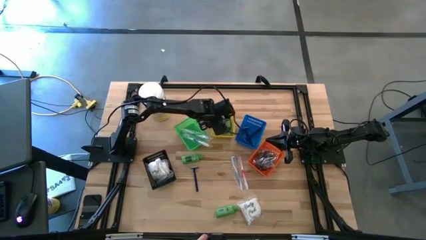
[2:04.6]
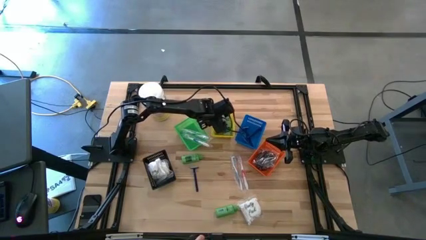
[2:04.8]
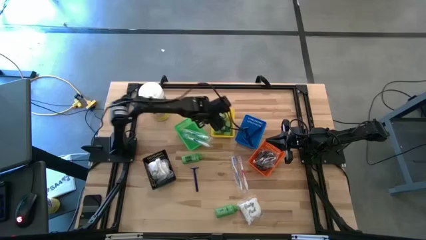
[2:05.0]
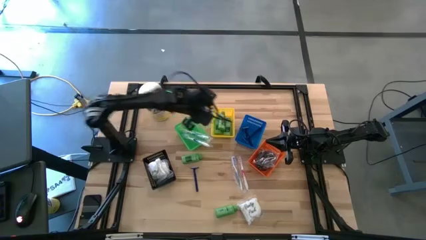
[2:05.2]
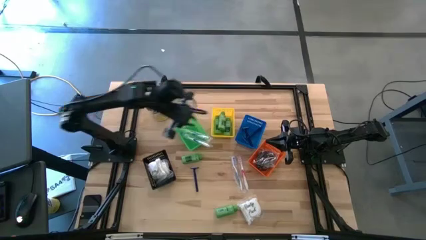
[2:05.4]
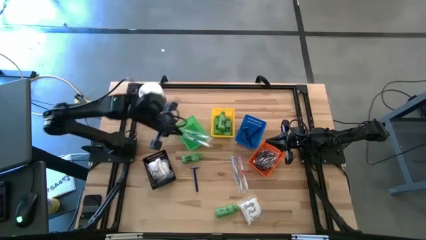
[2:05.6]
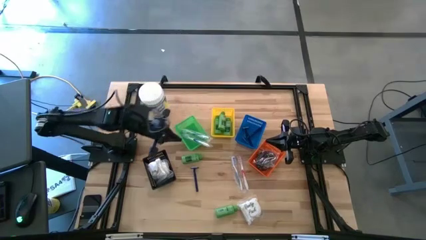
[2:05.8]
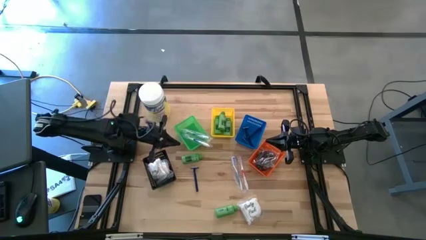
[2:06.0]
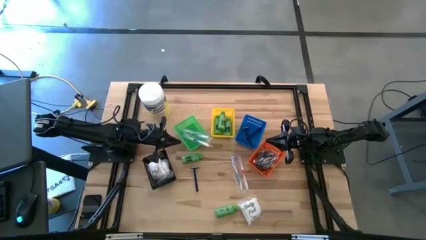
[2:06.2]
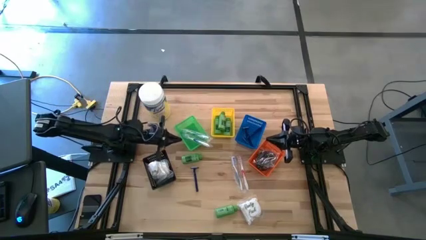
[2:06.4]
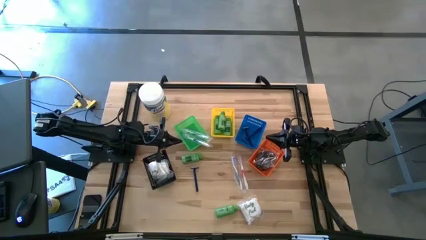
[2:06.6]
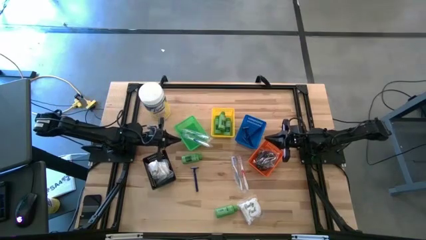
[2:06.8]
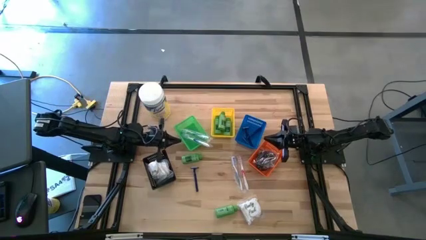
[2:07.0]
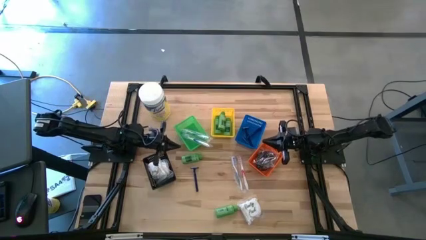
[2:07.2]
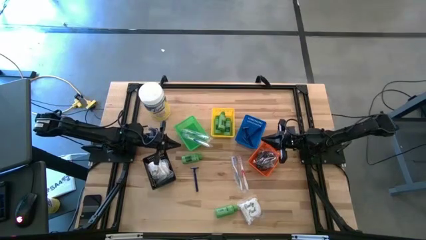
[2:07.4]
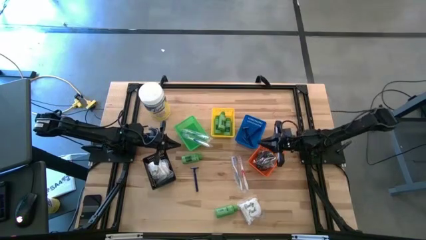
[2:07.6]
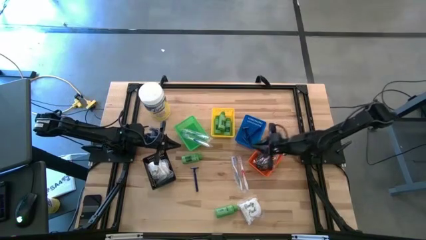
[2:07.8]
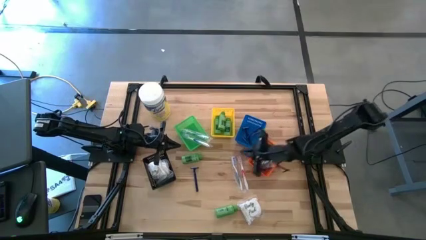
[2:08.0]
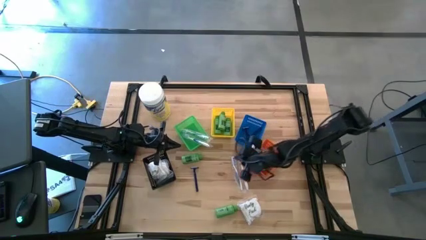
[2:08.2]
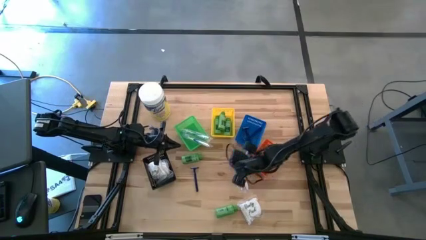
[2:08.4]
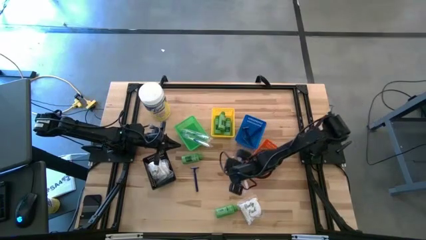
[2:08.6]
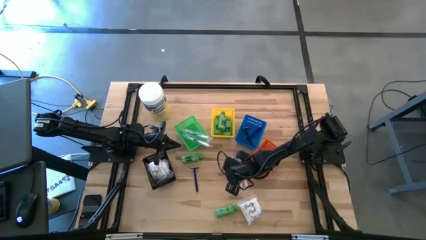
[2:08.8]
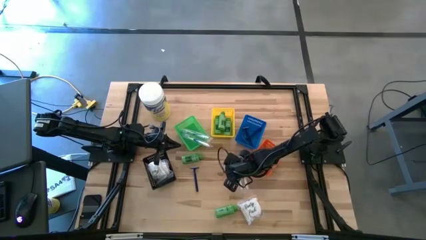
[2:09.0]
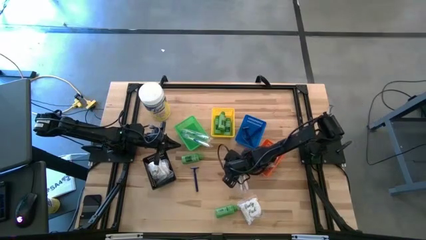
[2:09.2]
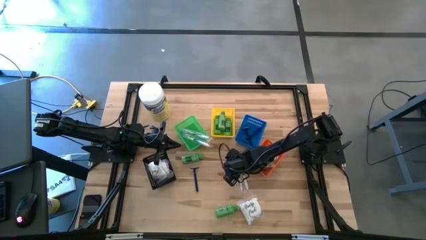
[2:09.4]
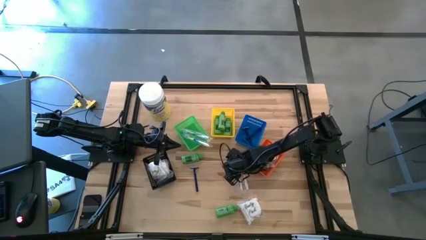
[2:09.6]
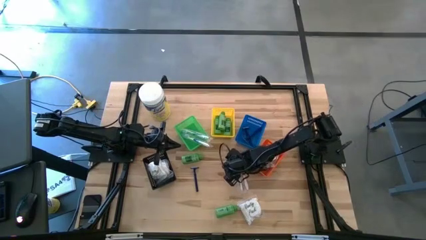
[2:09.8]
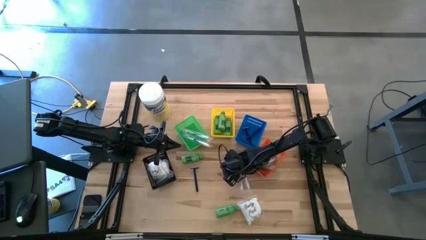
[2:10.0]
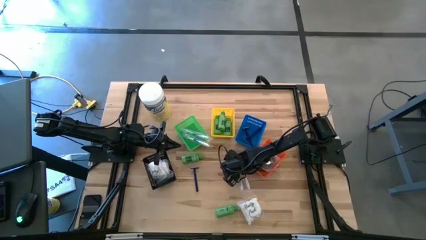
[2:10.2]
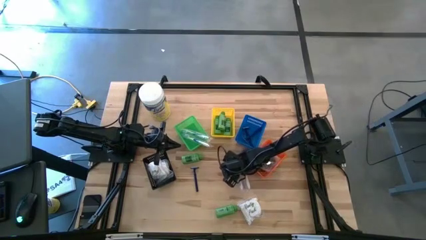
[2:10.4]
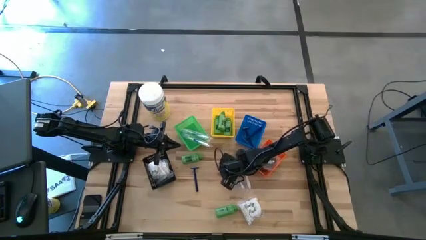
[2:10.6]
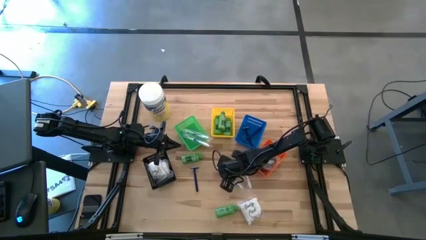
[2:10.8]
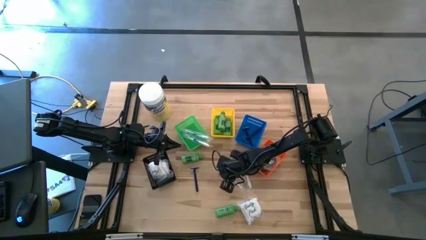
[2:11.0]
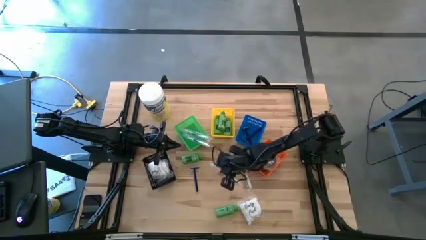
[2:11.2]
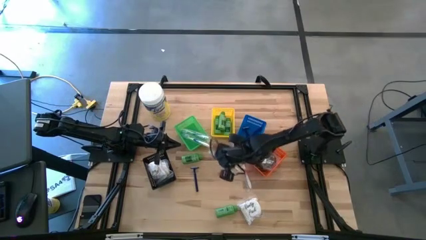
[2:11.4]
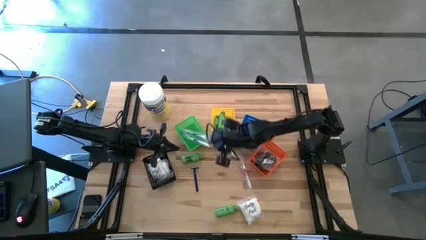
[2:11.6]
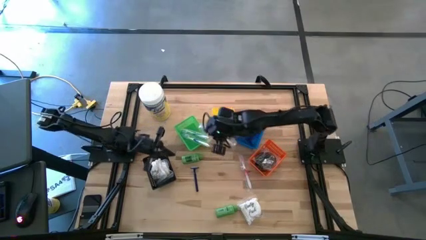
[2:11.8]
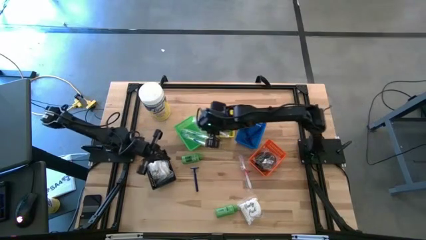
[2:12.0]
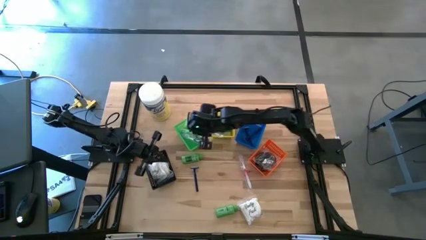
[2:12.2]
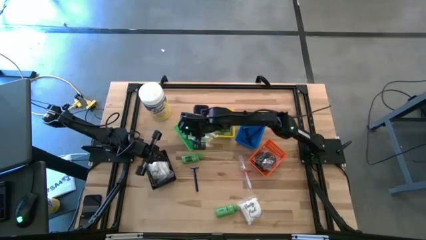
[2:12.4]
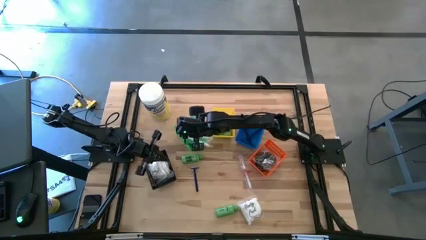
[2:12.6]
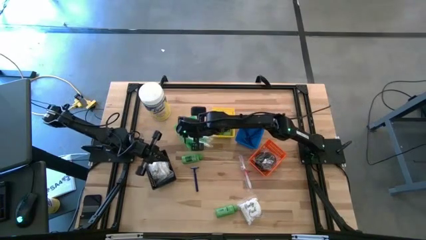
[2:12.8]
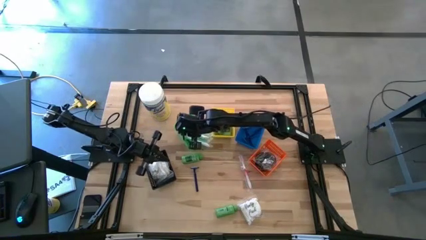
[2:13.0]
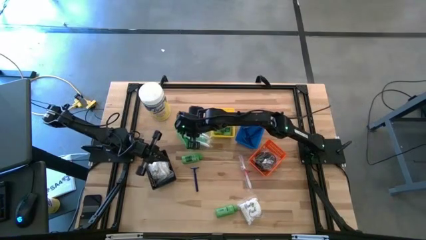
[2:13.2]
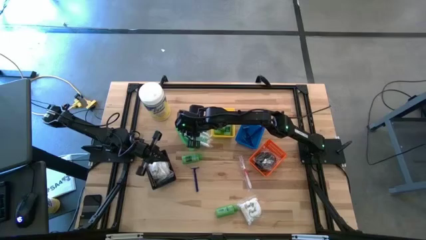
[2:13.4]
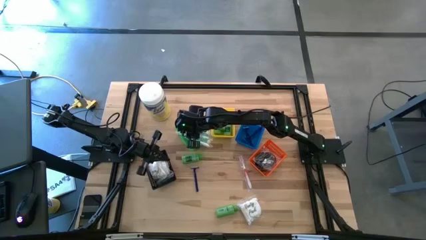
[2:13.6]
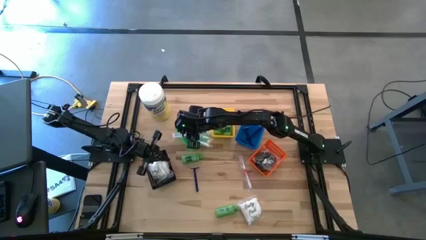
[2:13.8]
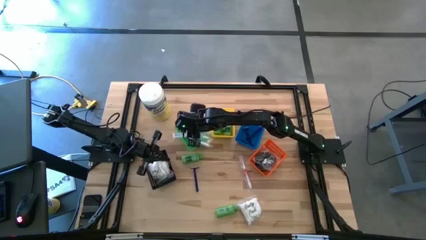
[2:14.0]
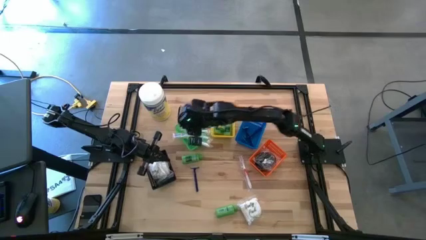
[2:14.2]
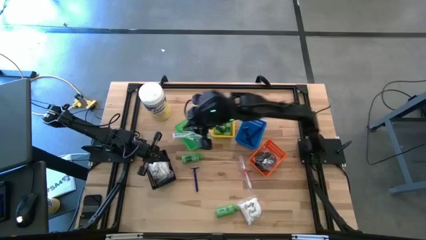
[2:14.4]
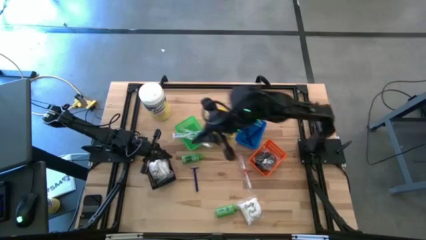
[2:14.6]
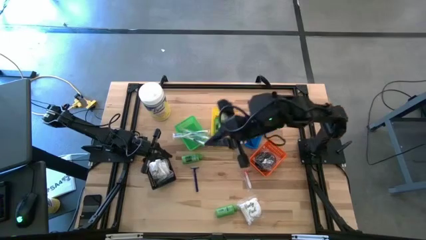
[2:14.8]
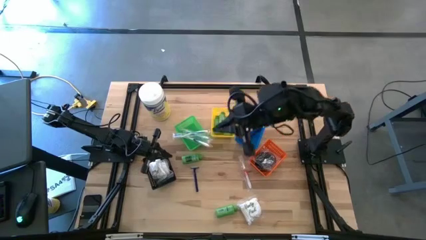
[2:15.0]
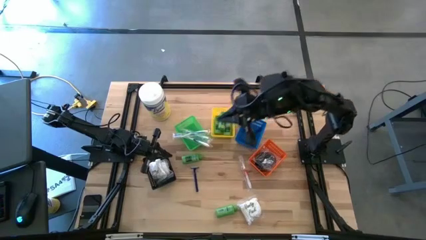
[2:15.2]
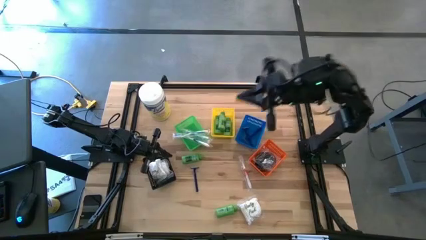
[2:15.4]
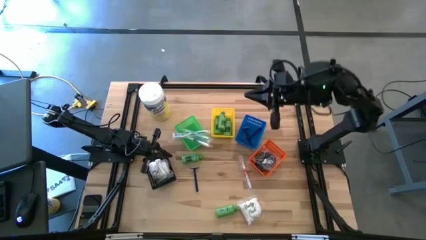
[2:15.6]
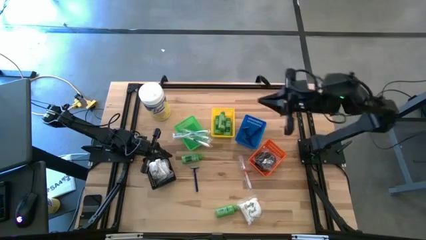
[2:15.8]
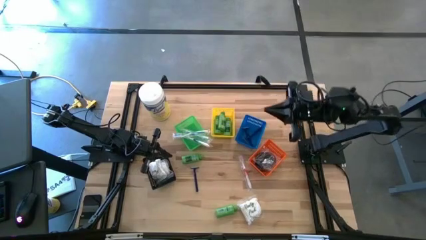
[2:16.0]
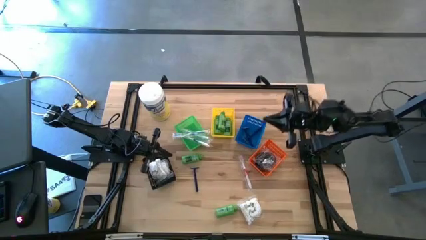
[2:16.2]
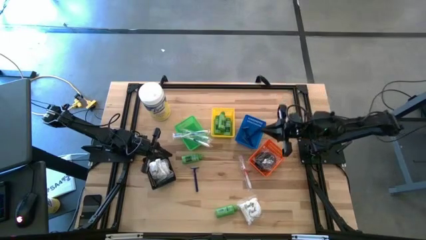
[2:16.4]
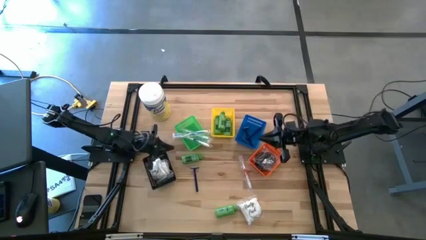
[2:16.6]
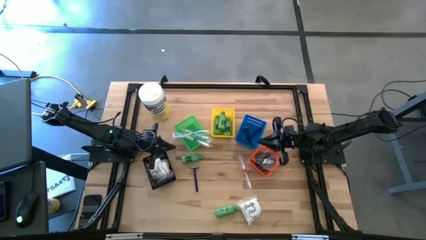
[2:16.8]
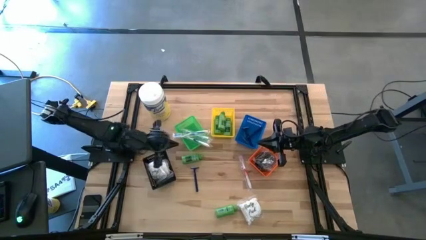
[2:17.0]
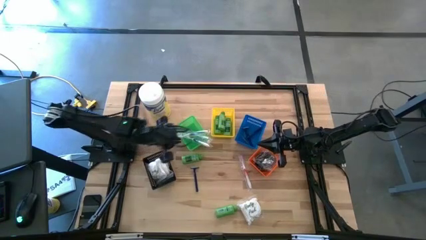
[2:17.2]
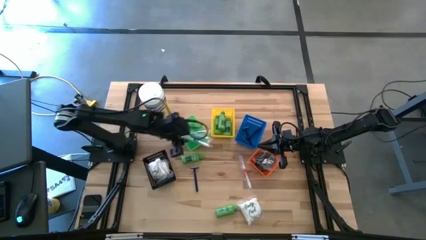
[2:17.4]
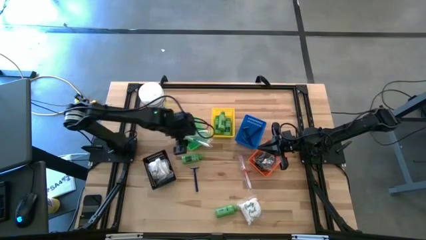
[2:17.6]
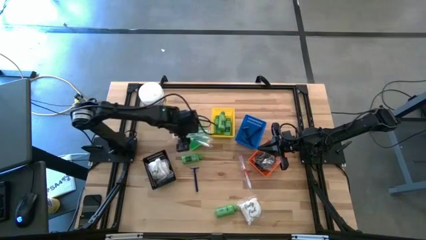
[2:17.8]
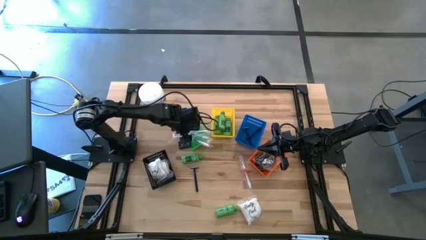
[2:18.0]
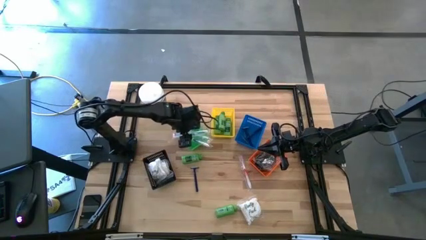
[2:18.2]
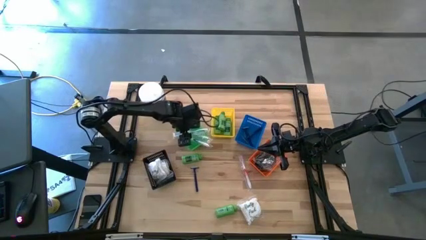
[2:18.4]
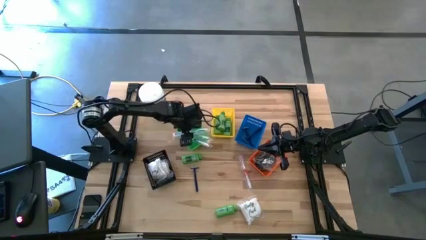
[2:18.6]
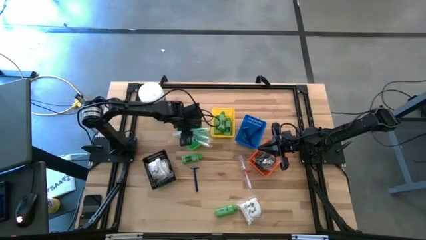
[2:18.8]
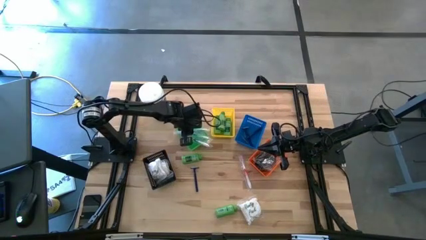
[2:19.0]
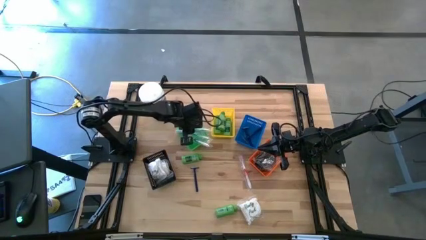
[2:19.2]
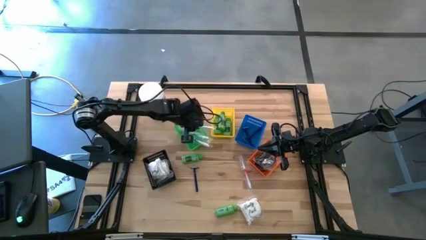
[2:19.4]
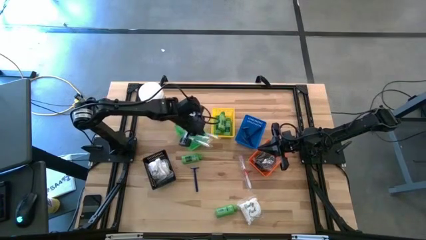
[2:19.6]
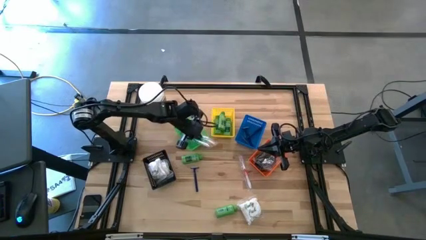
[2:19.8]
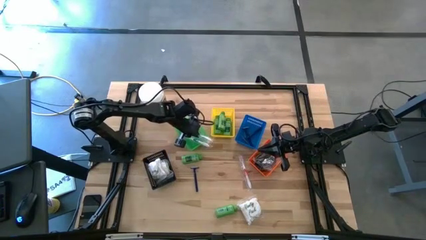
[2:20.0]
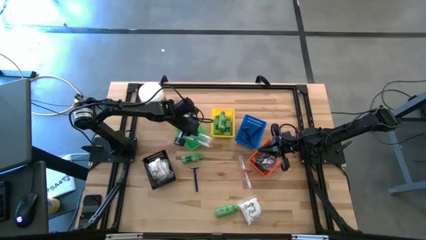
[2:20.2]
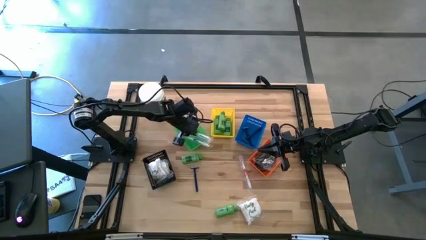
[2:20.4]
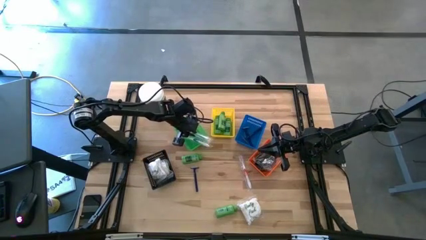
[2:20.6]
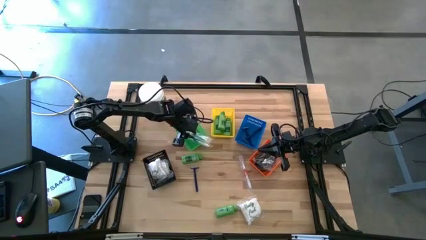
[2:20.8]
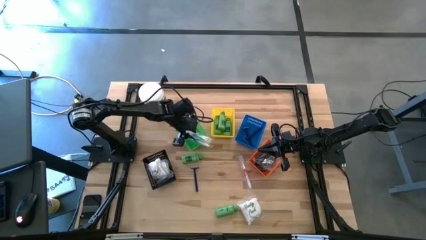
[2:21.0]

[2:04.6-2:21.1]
Task: Pick & Place Travel size toiletries
Put the blue toothbrush into the green bin
